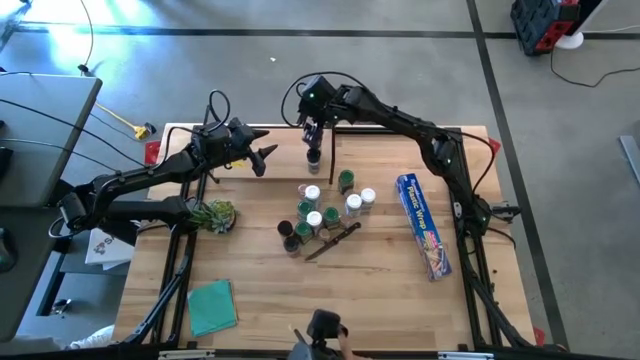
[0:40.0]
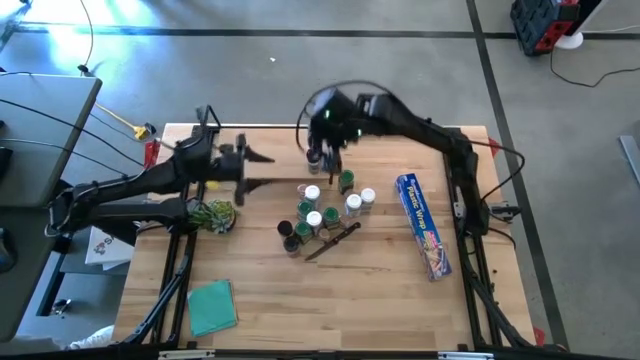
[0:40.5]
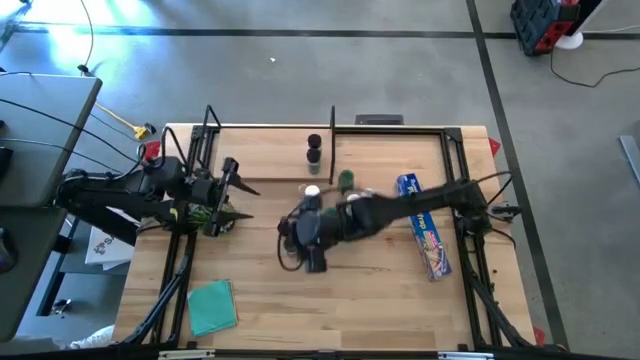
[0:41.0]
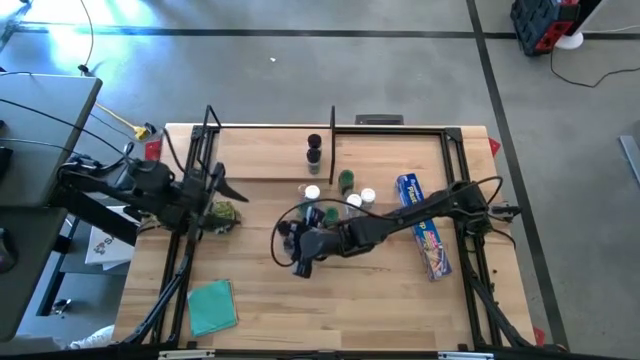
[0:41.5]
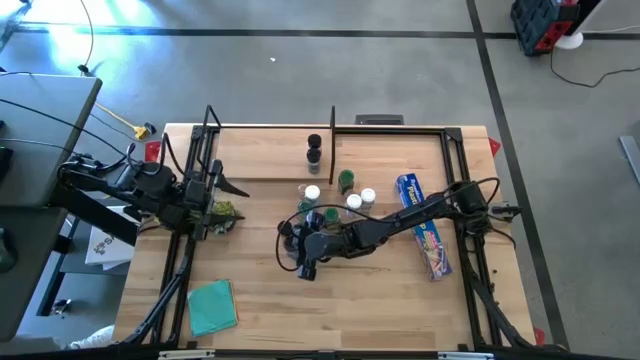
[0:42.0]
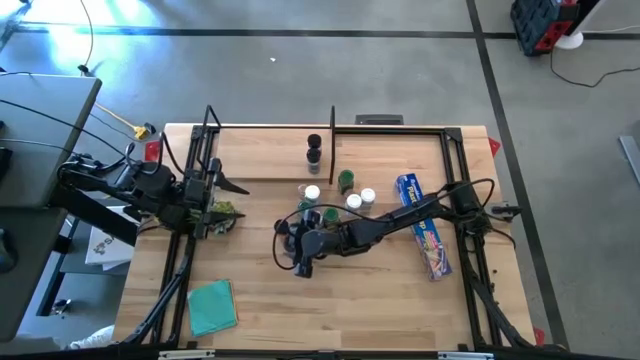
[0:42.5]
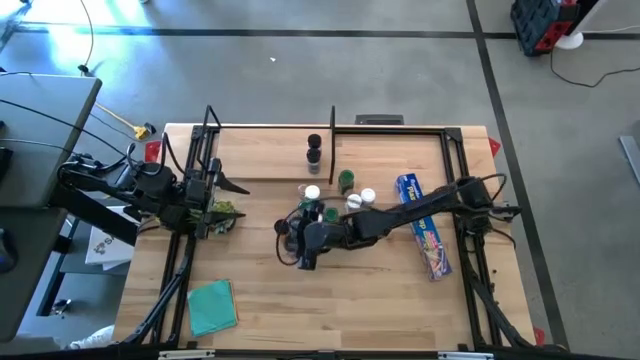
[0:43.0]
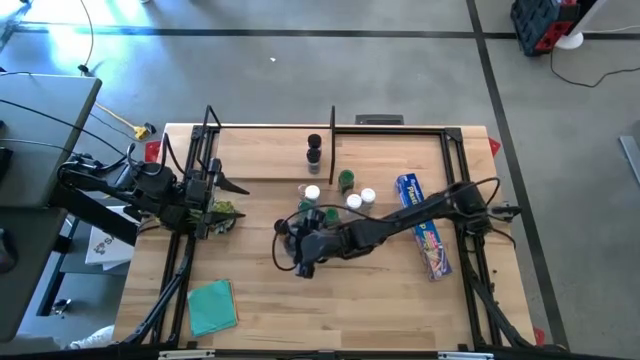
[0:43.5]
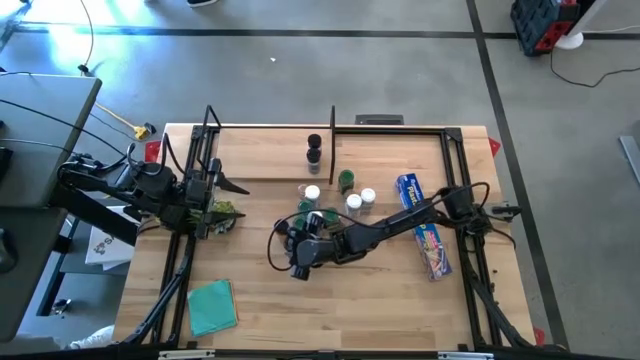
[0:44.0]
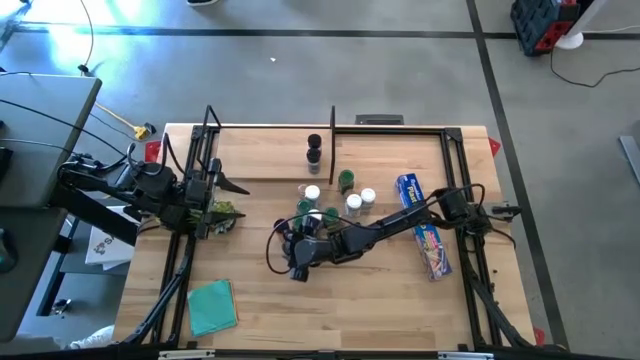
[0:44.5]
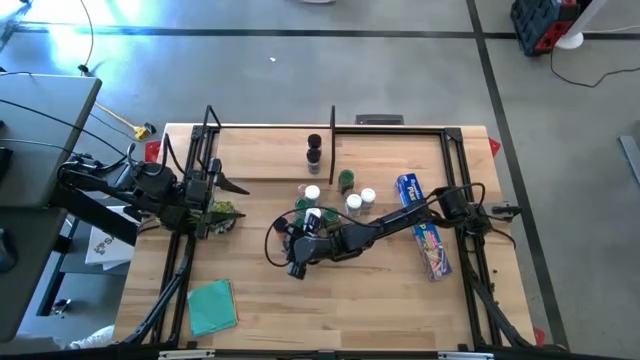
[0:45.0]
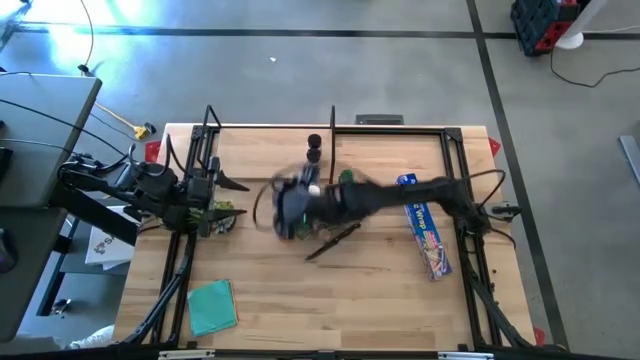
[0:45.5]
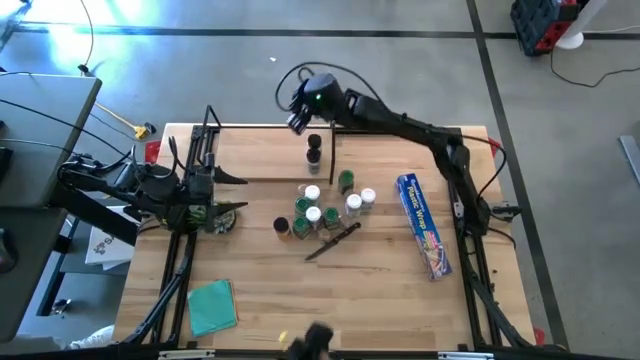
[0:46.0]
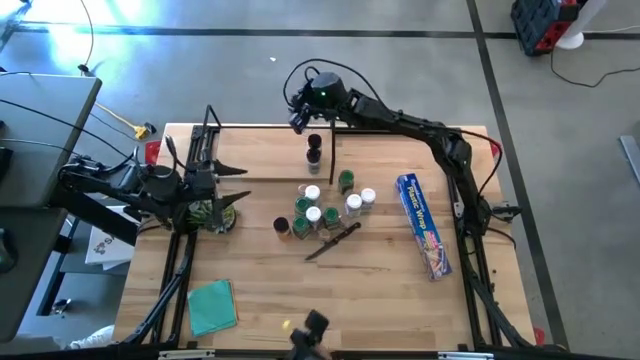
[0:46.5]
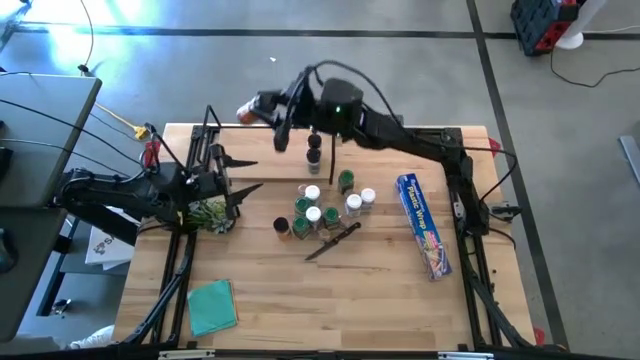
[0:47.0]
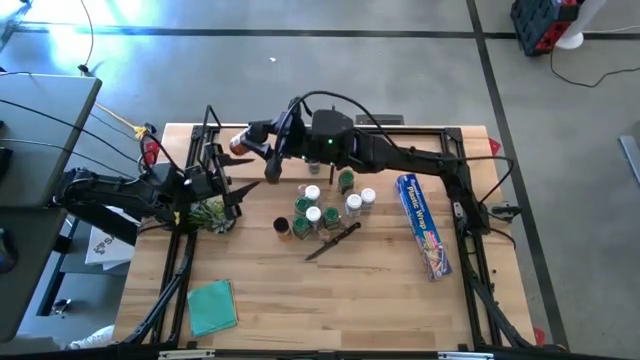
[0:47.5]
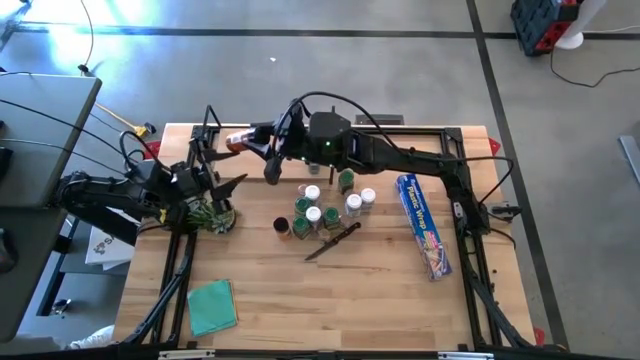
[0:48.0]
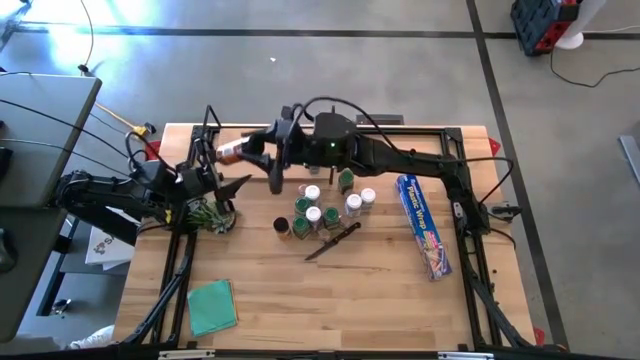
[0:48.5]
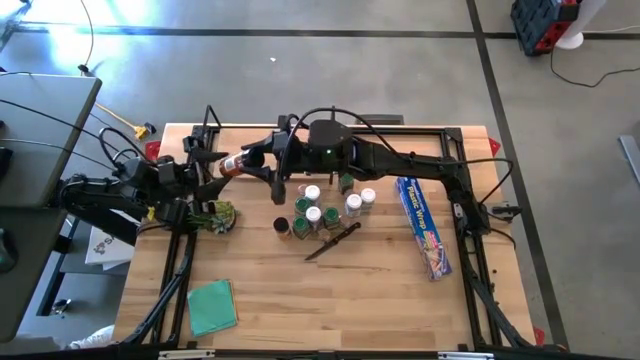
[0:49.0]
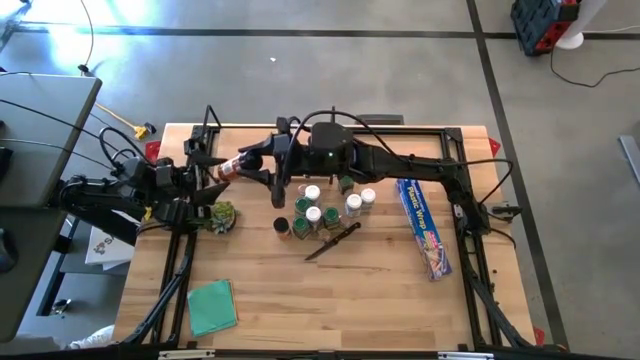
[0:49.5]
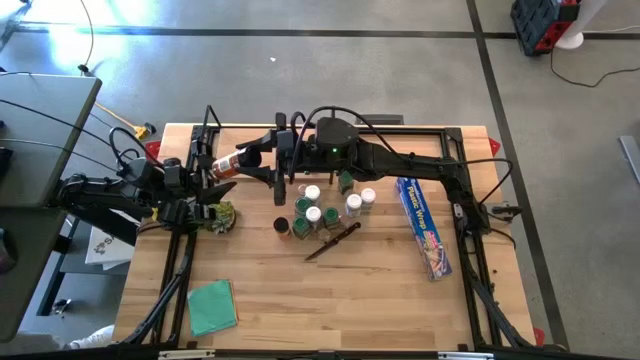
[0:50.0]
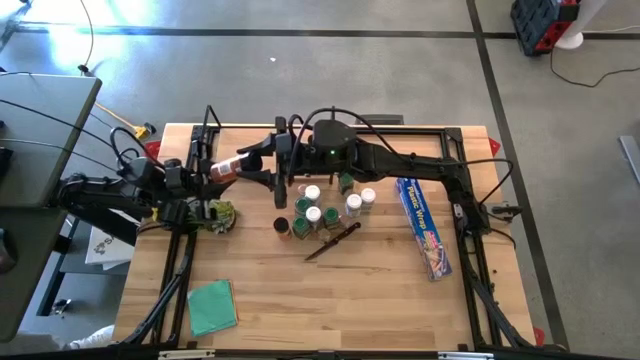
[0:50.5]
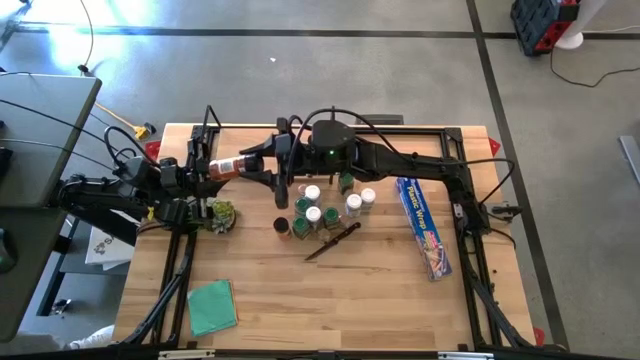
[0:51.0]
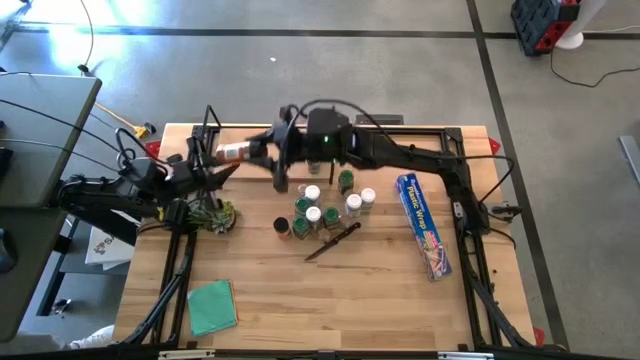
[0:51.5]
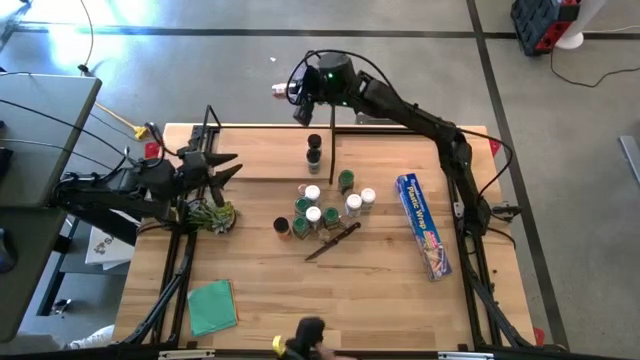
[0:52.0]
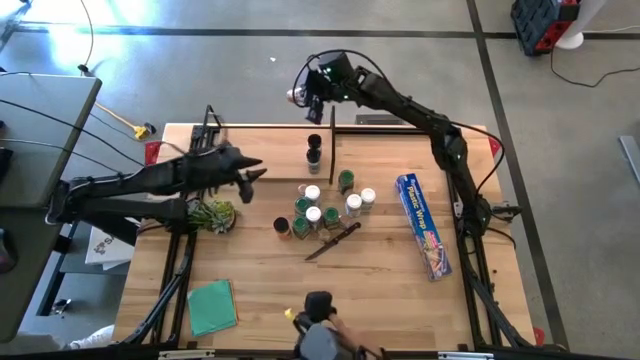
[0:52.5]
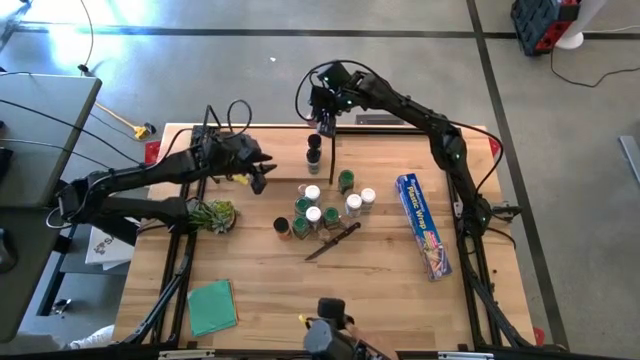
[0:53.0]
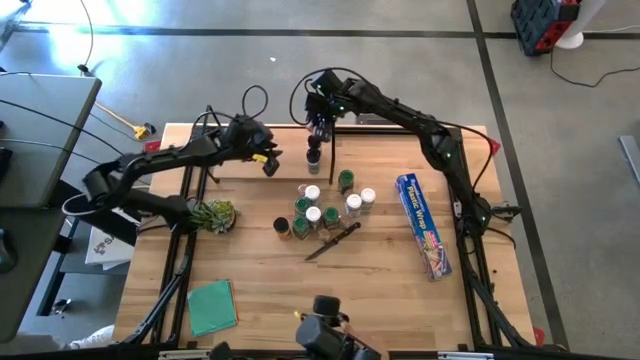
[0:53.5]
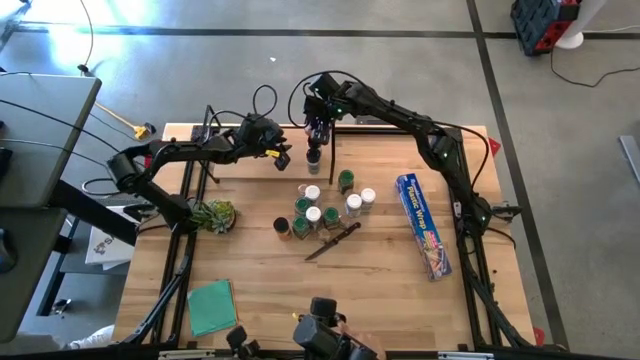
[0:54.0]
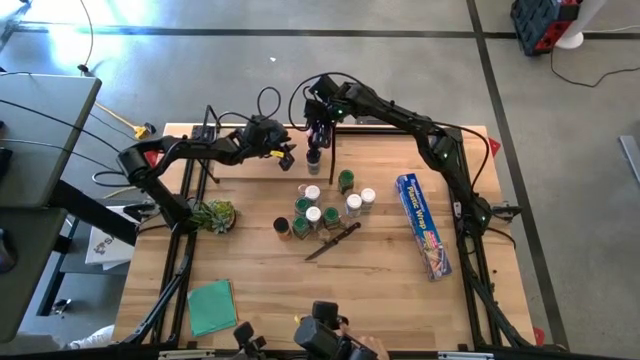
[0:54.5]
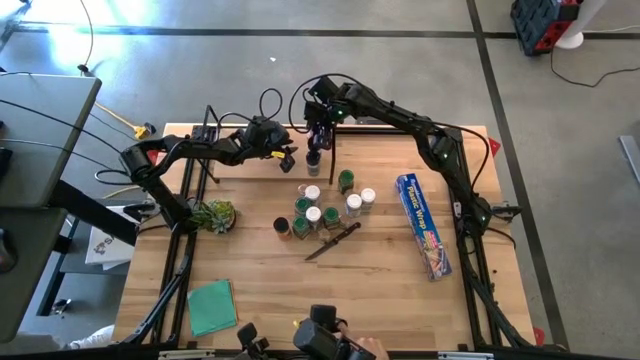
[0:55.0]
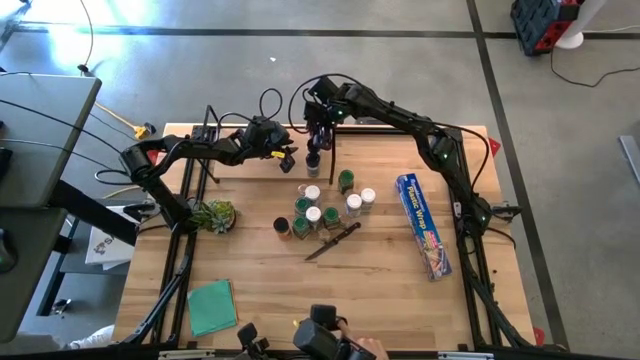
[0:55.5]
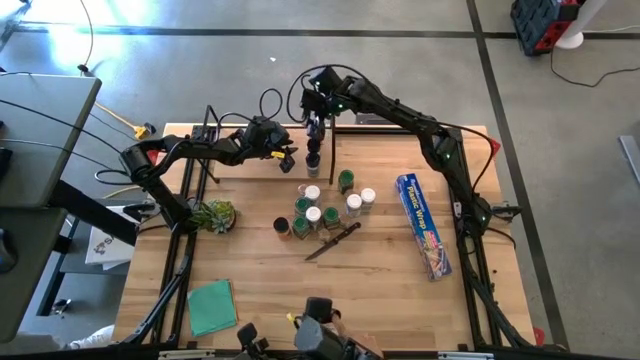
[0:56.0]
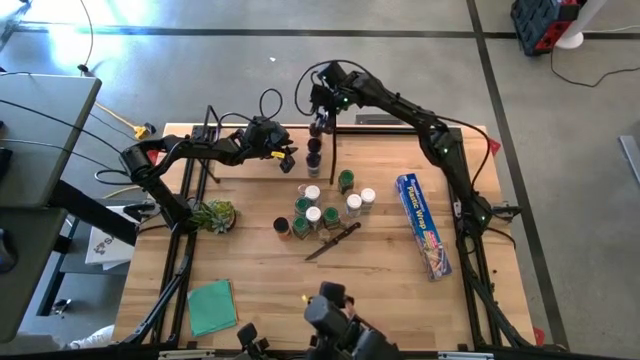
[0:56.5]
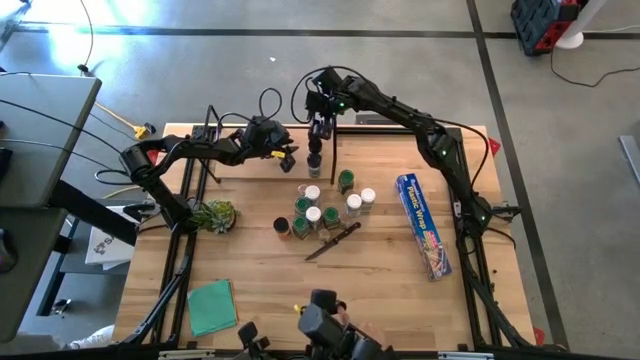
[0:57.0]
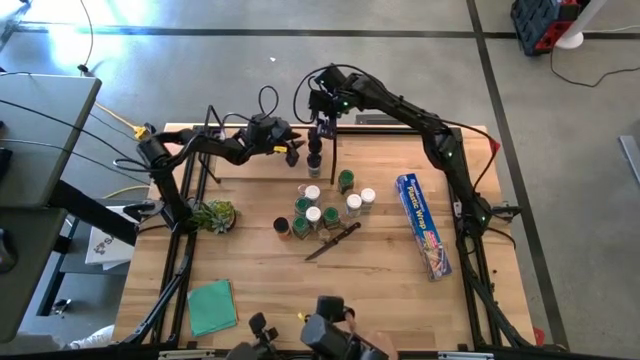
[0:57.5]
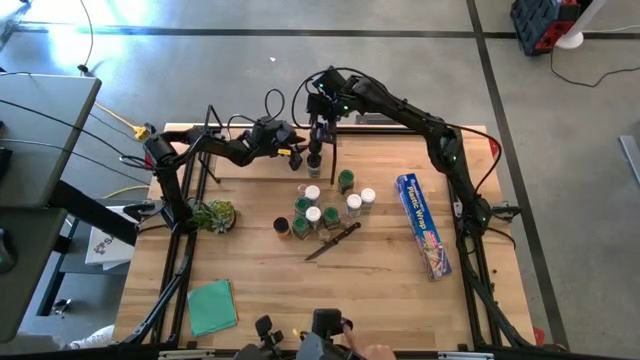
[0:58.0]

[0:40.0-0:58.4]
Task: Shelf spices
Put the black lid seasoning bottle on the shelf
